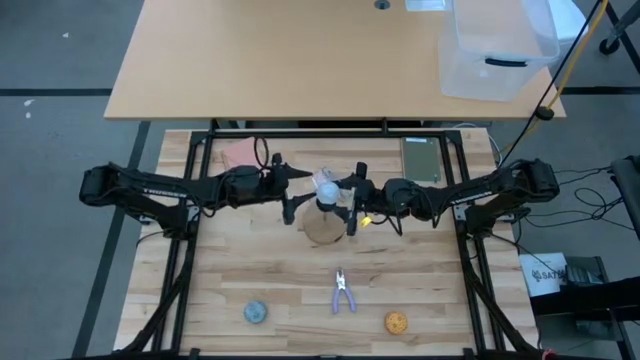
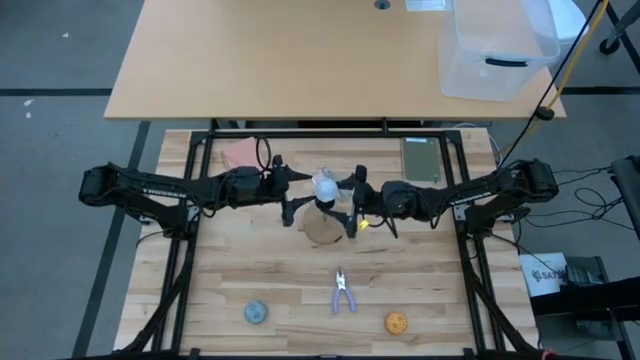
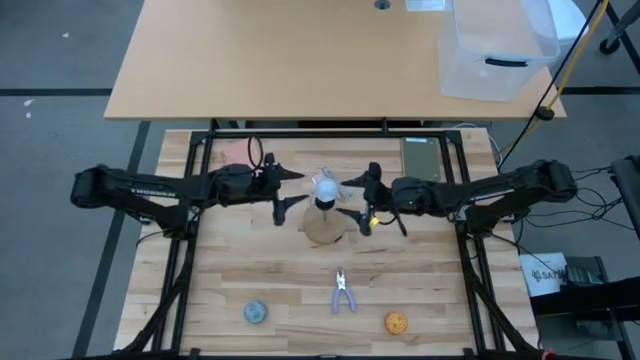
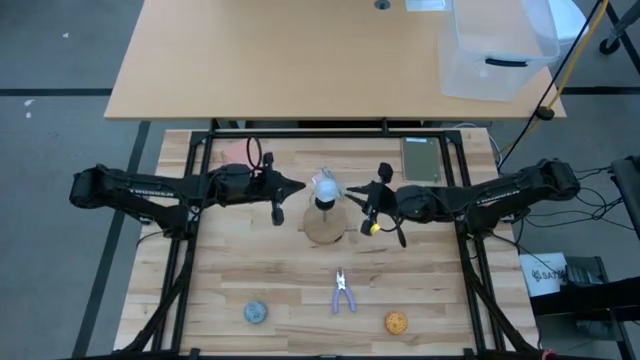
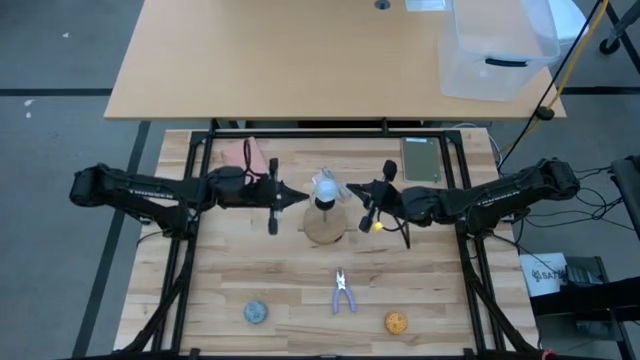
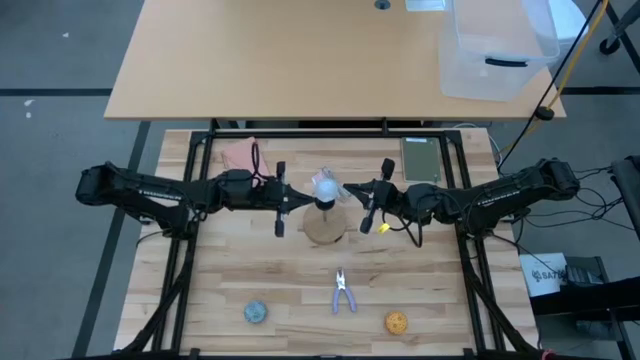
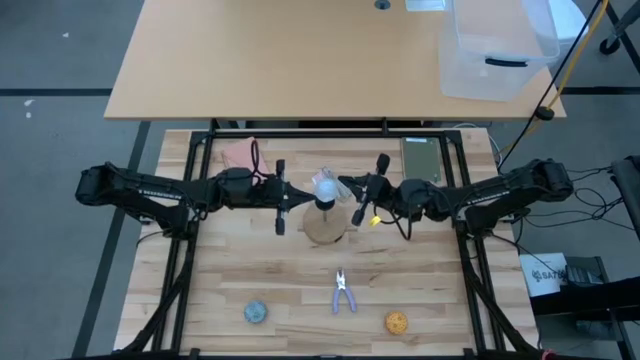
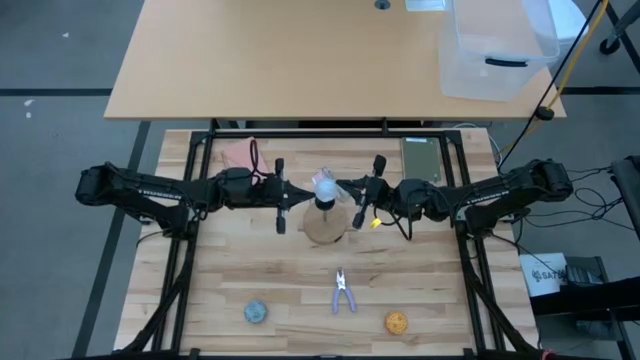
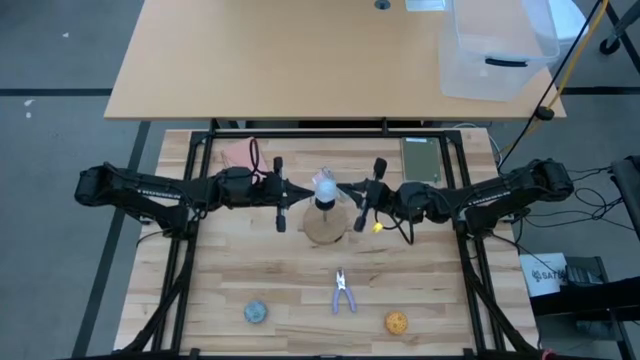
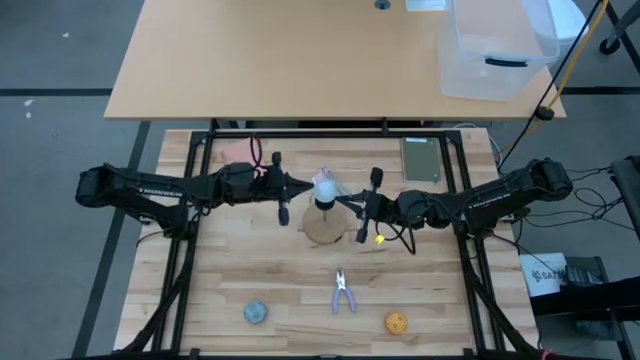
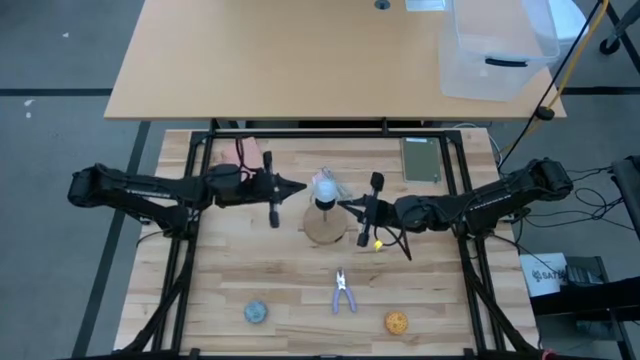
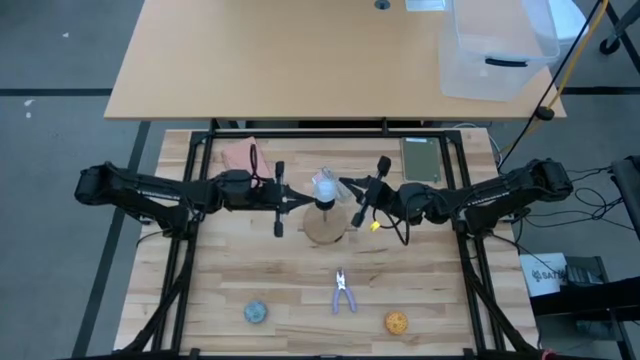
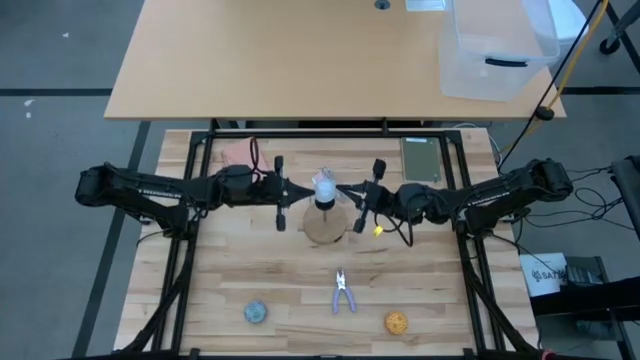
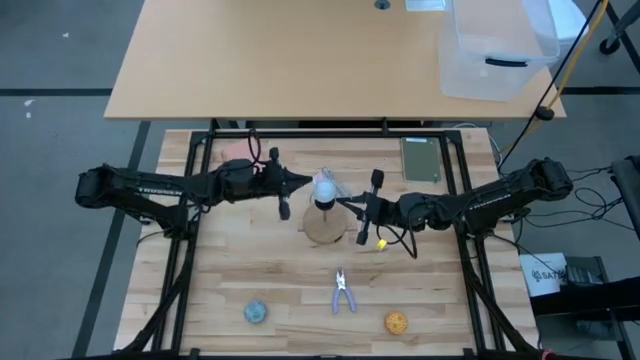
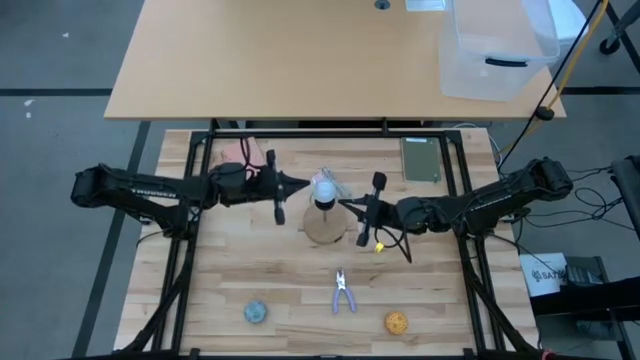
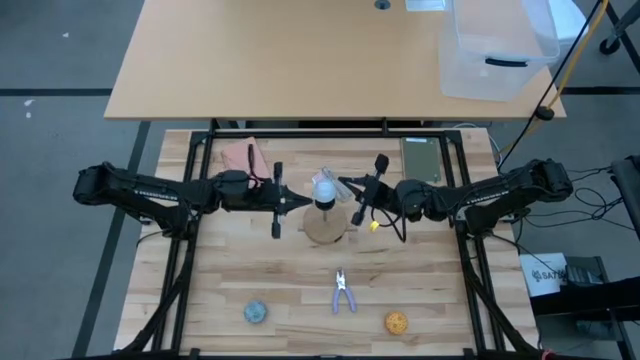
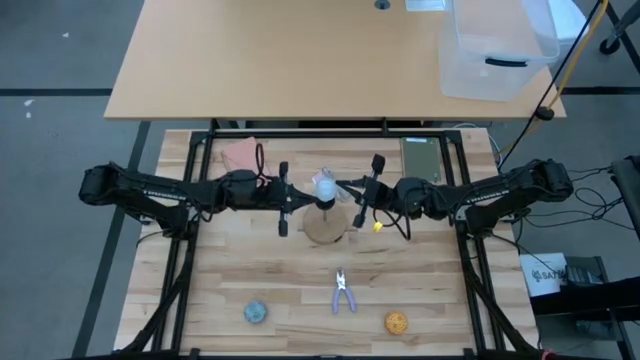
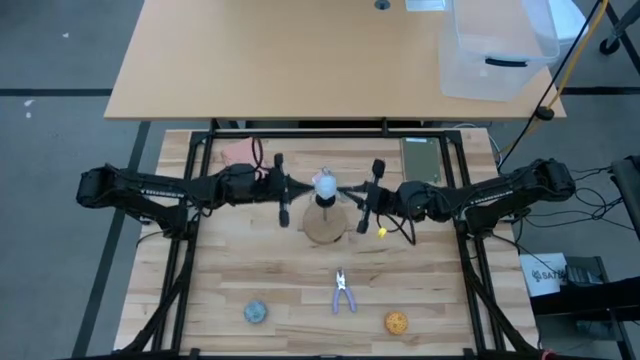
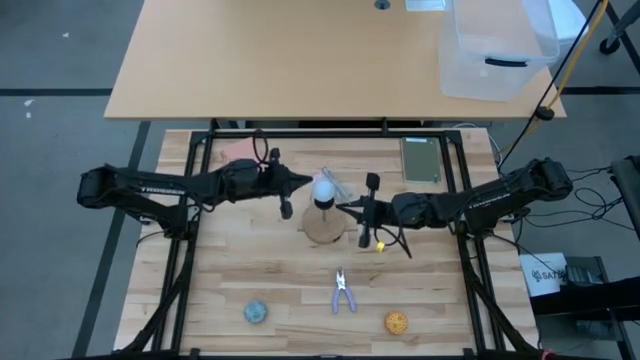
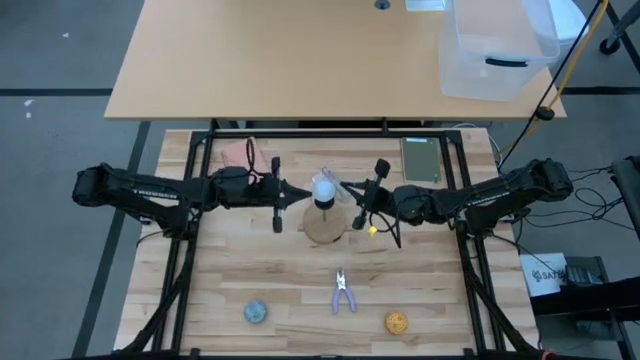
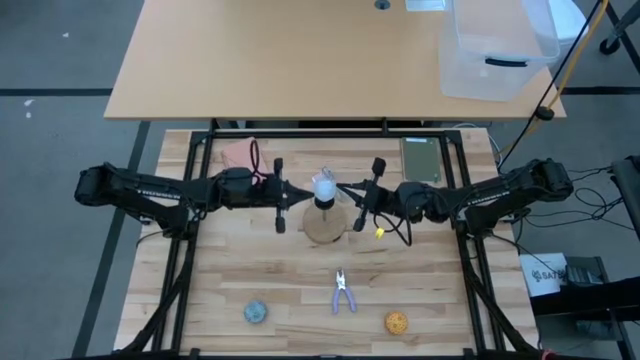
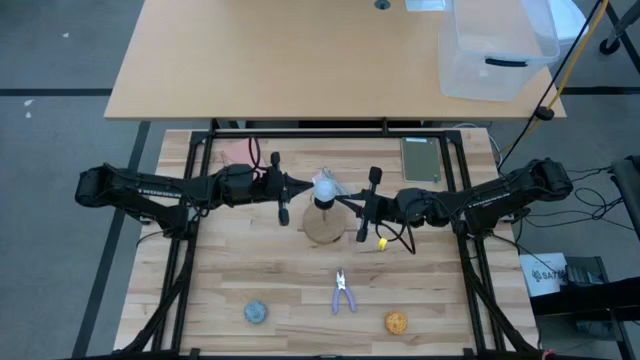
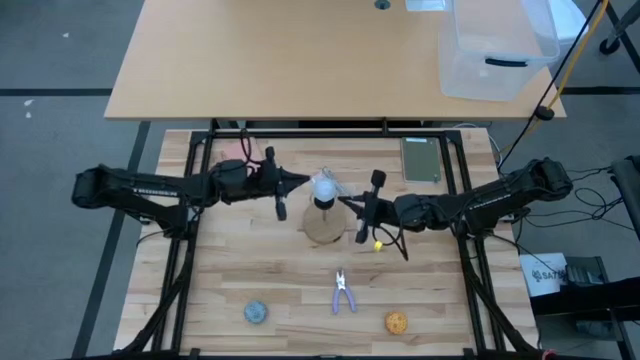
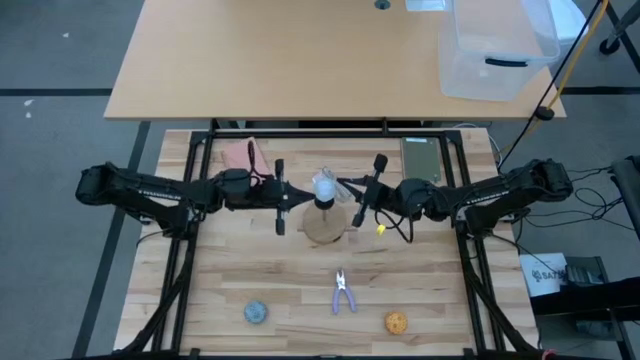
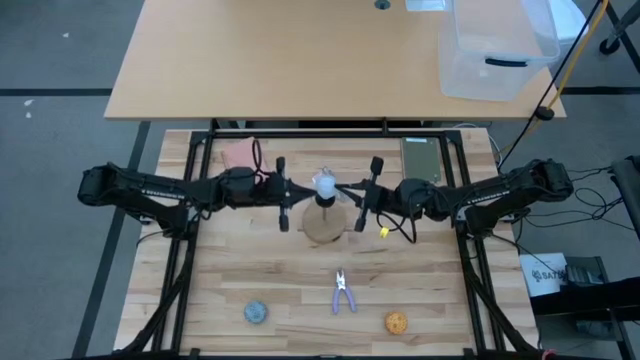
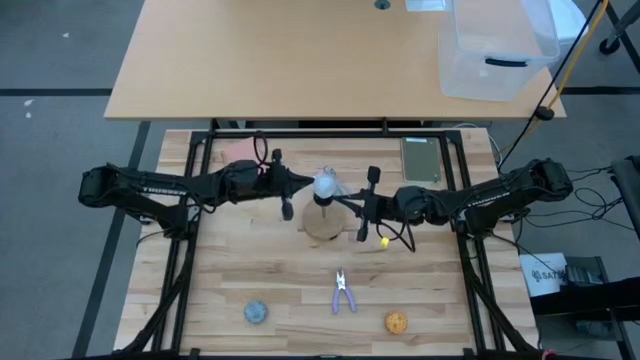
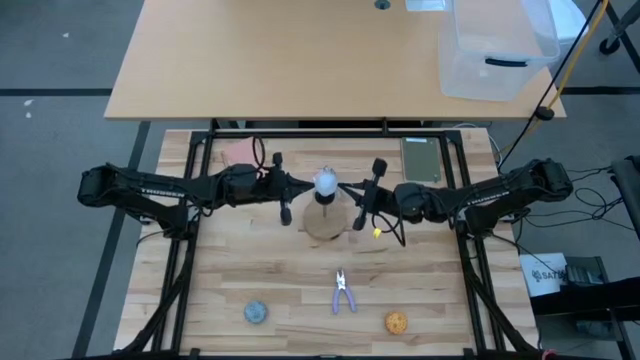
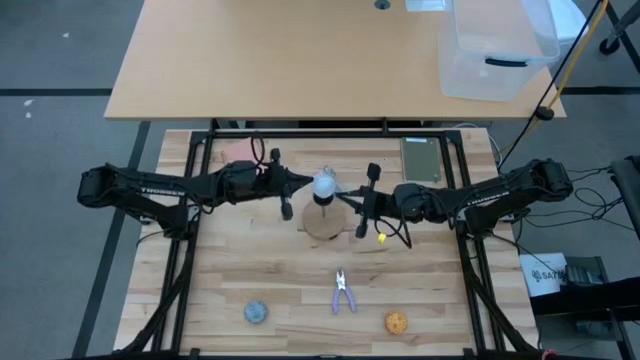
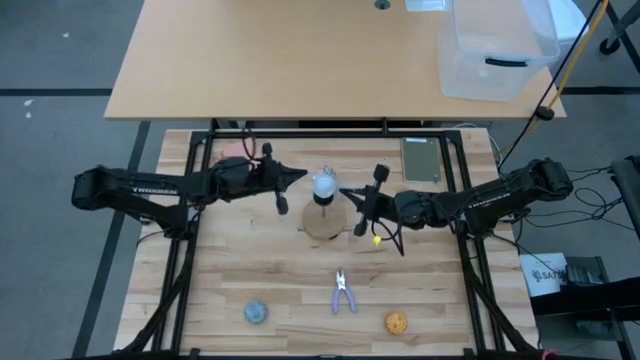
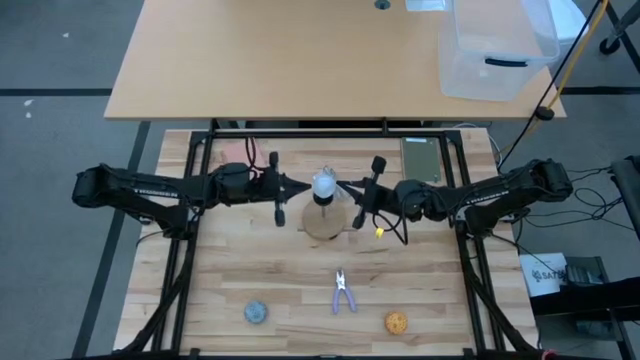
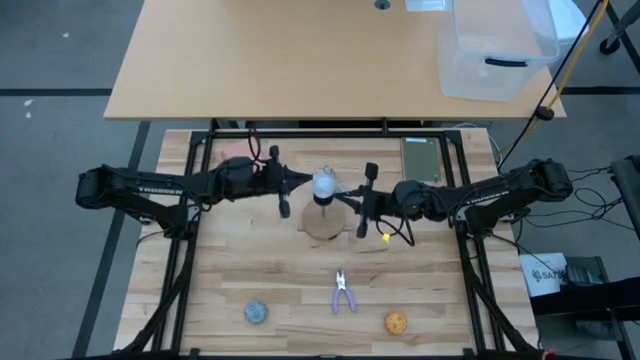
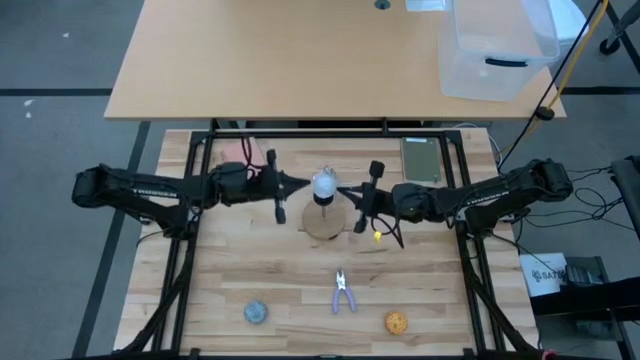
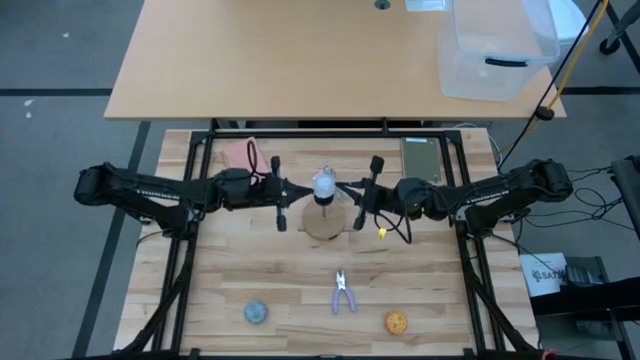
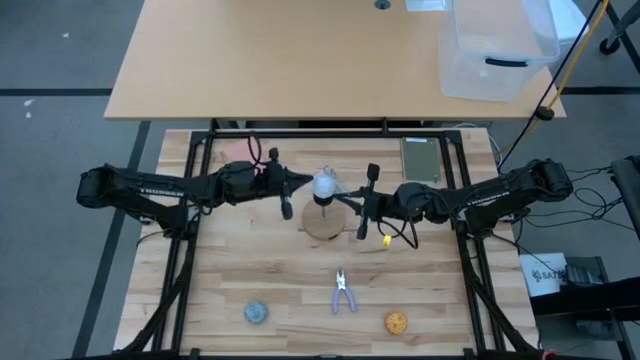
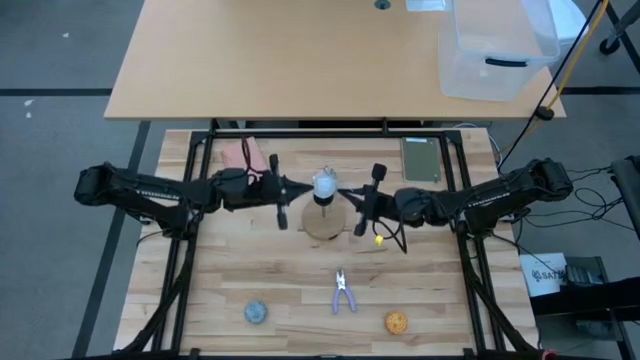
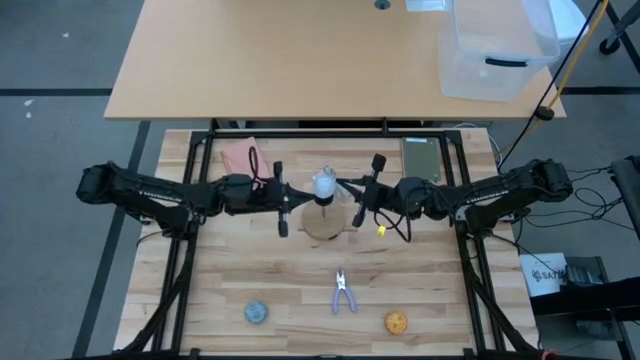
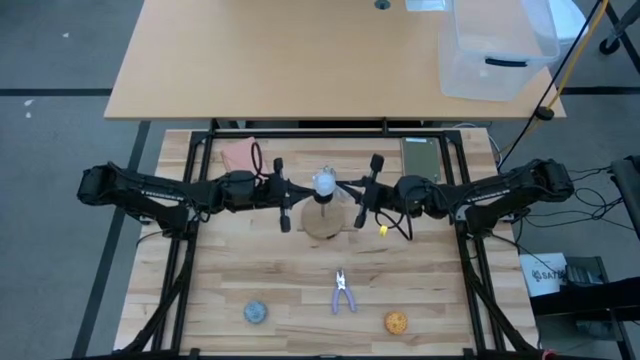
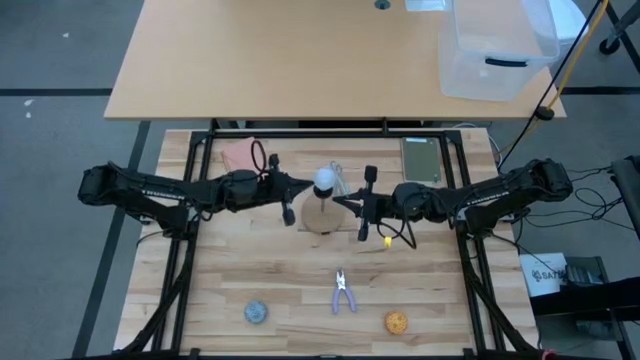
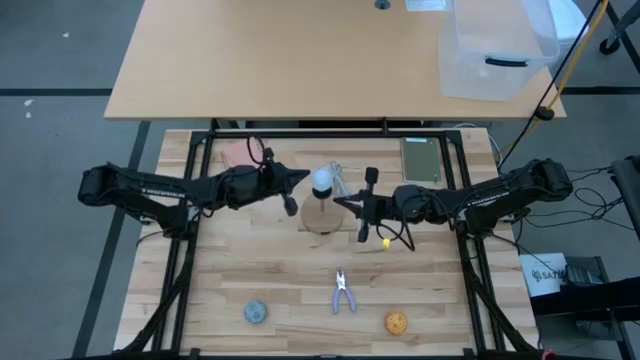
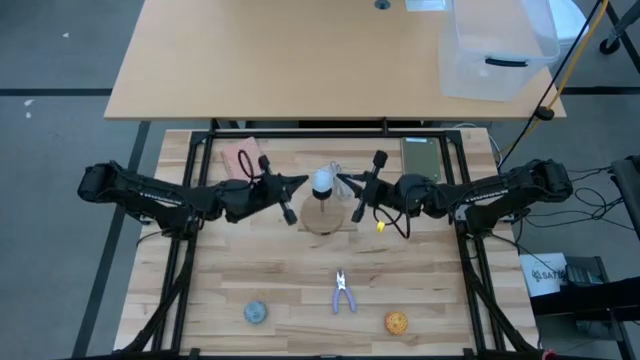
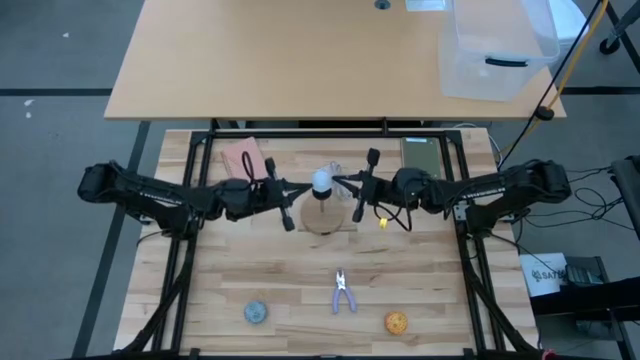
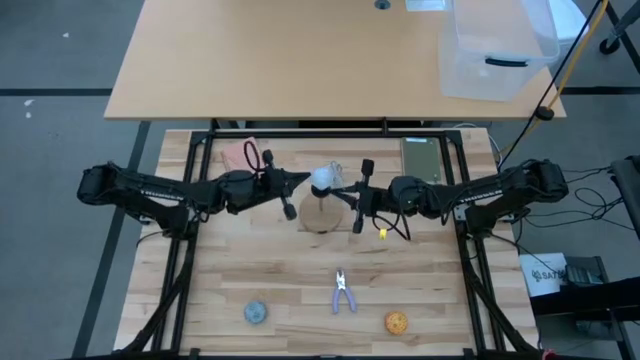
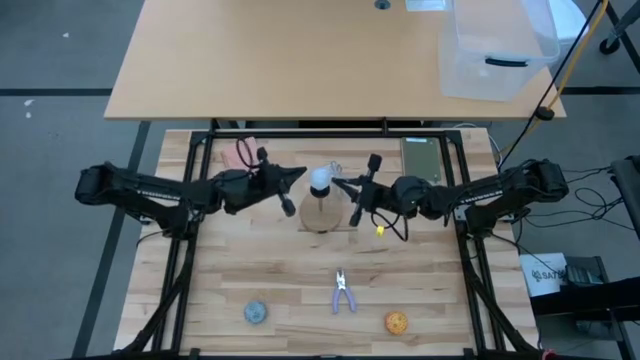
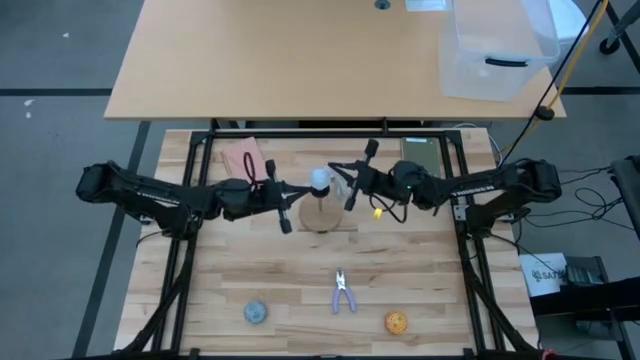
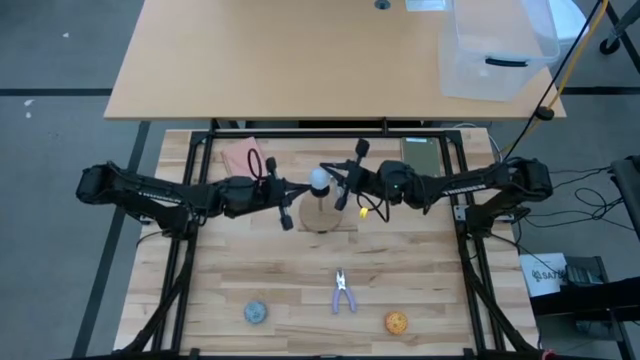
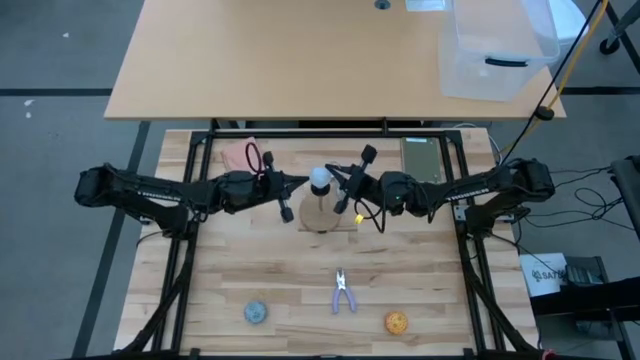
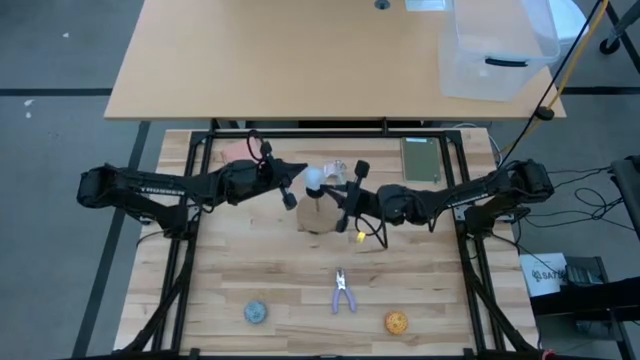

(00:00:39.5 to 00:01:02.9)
Task: Screw lightbulb
Insert the lightbulb on the lamp
